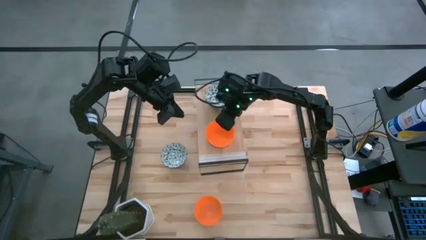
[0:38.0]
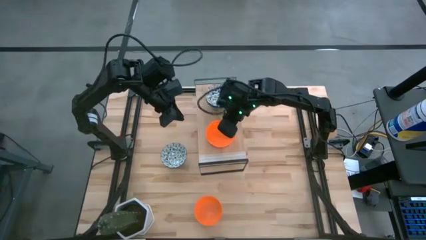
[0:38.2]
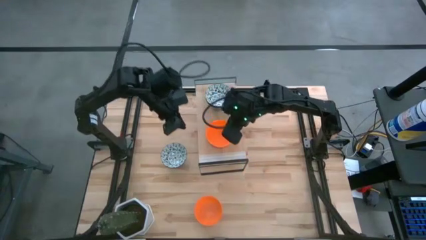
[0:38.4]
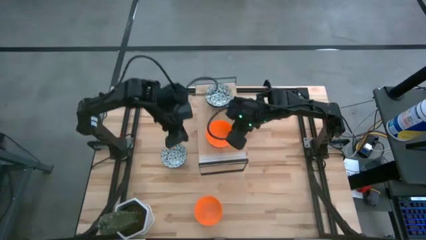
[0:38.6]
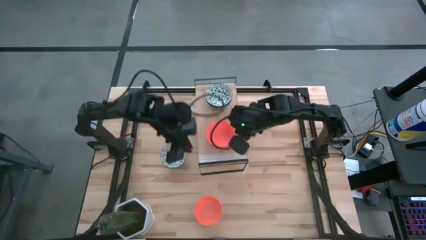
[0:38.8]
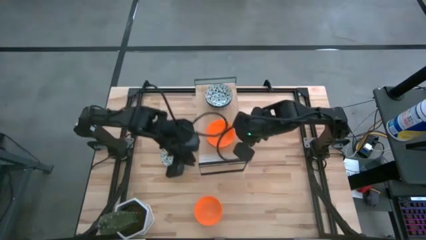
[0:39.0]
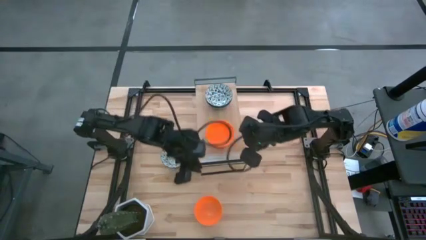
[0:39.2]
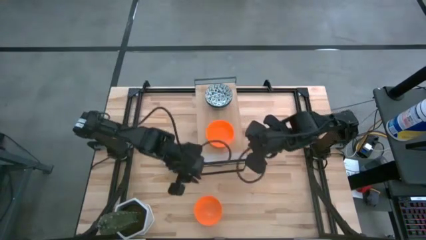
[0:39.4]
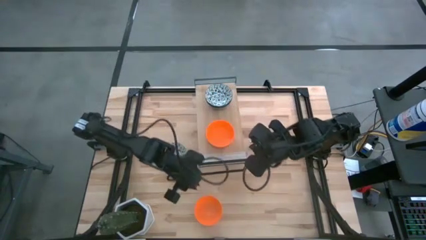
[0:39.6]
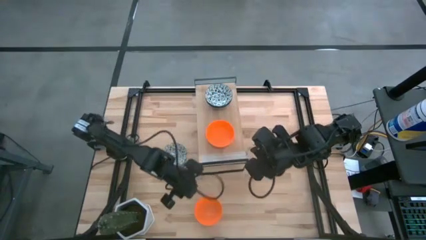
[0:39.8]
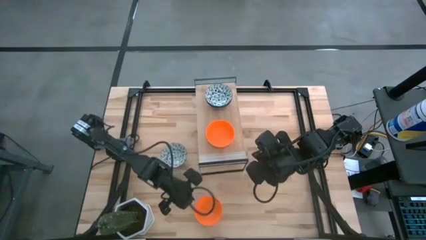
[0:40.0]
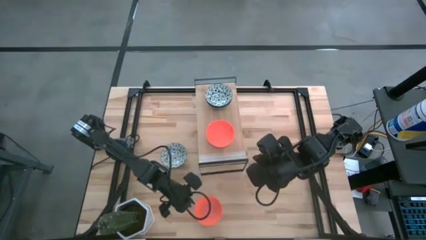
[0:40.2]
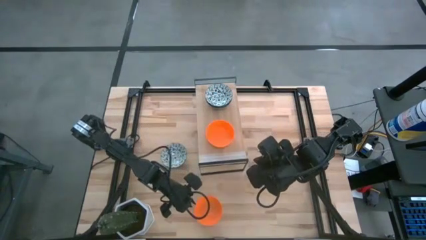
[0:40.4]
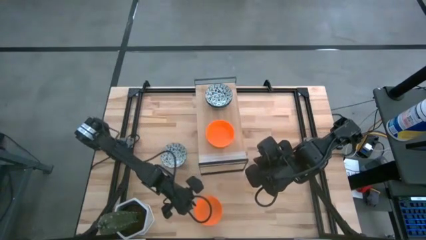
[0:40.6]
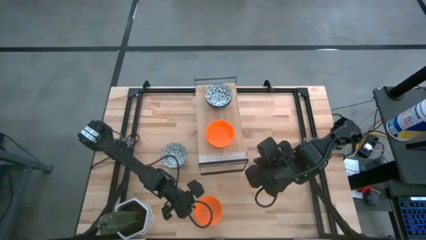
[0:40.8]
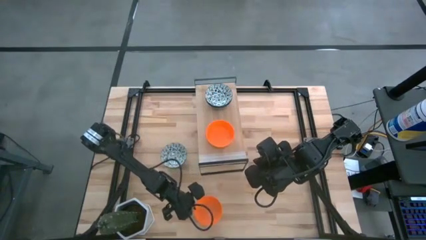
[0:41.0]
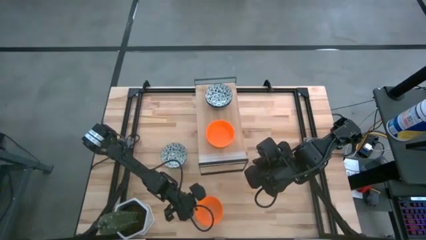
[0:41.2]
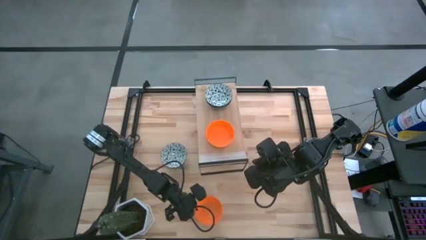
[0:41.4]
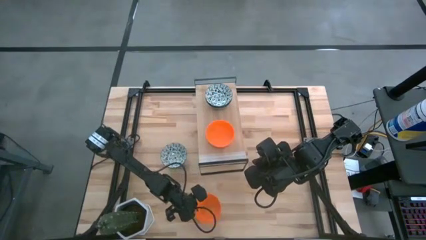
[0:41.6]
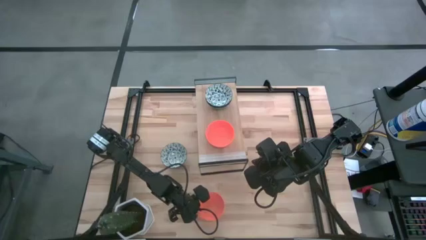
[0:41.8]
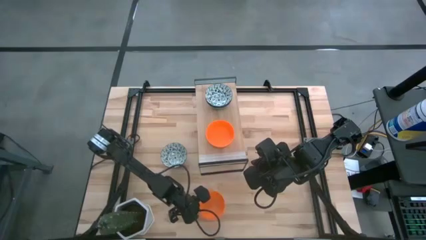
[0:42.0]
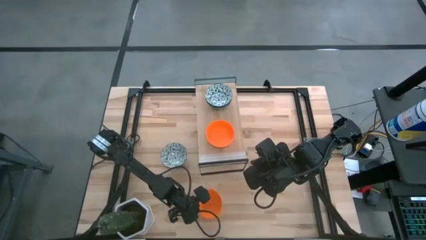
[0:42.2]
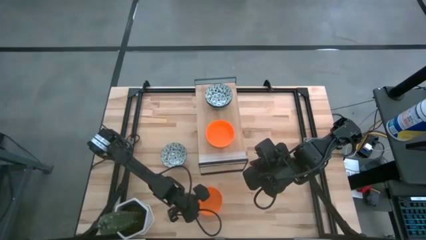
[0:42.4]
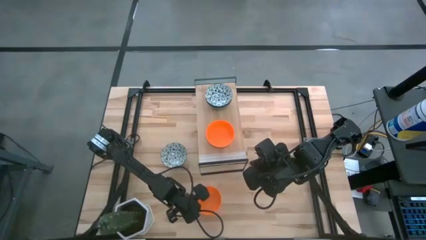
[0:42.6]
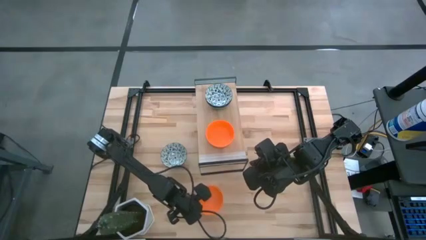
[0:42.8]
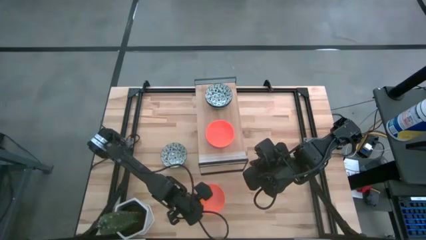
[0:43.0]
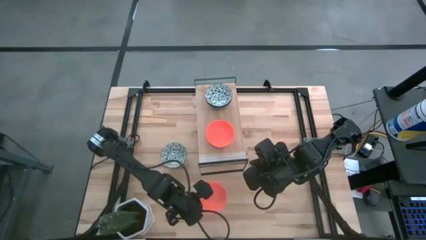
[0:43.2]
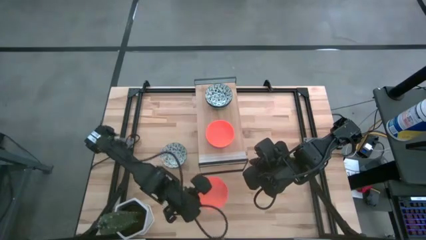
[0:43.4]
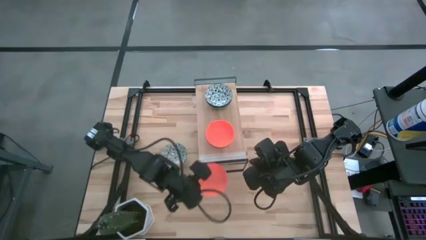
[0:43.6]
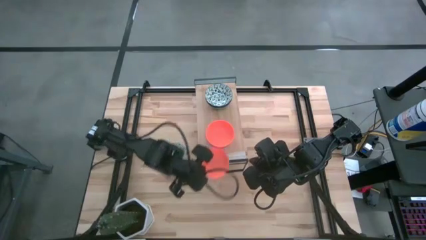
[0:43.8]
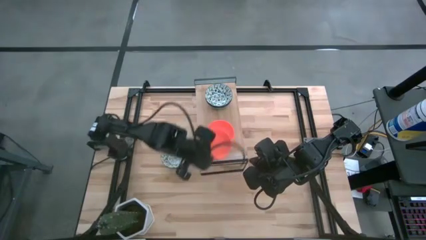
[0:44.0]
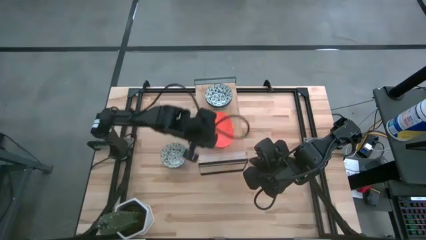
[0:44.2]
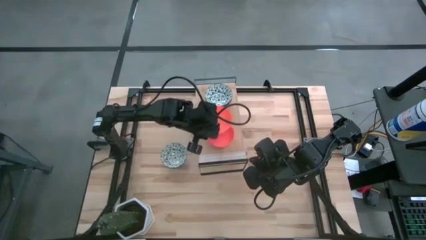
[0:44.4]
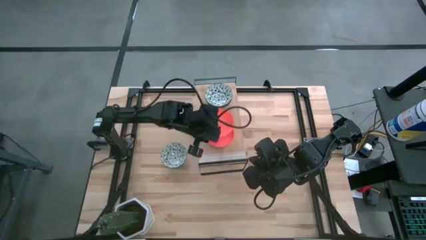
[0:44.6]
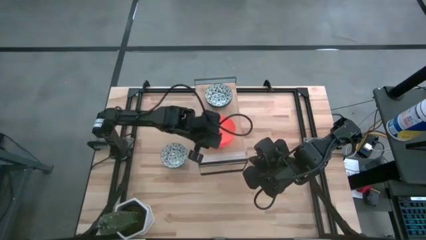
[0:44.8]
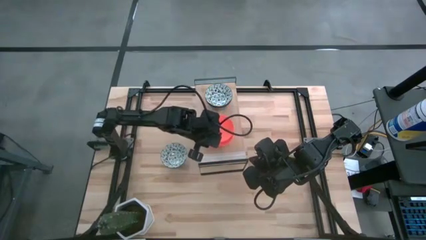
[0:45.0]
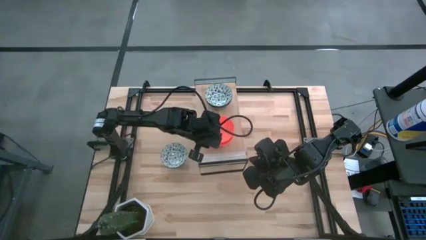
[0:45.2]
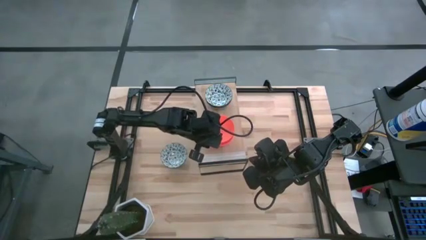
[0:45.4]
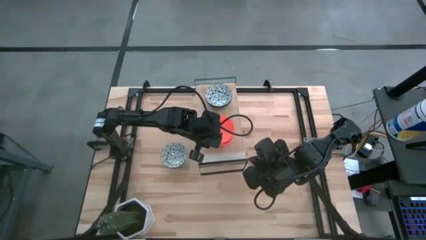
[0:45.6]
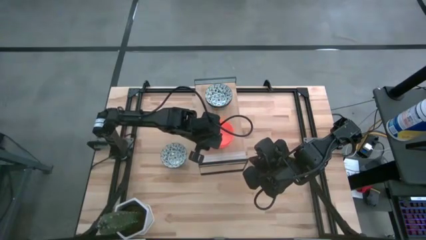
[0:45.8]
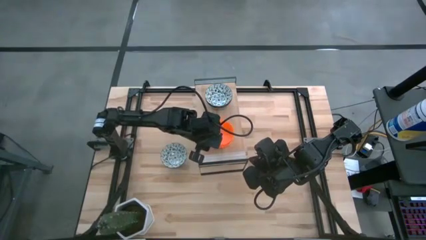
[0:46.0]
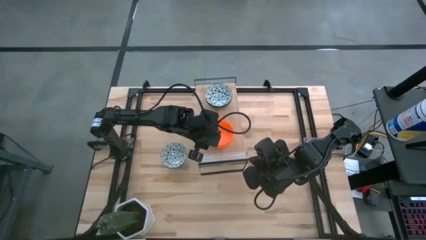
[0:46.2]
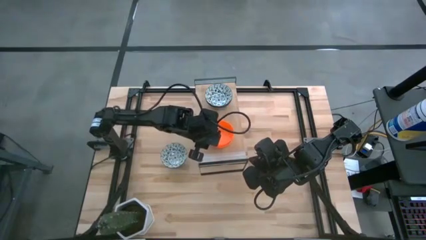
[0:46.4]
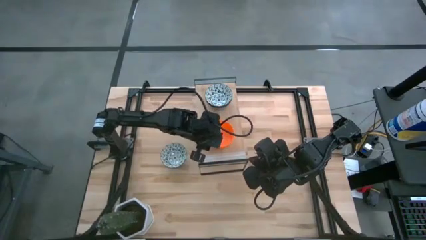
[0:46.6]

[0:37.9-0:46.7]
Task: Pick & Place Mini bowls
Stack the orange bowl on top of the orange bowl on the shelf

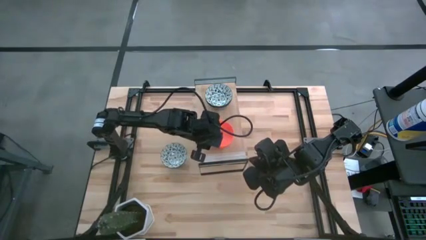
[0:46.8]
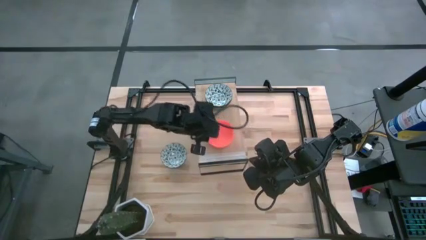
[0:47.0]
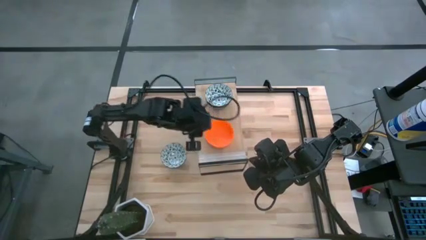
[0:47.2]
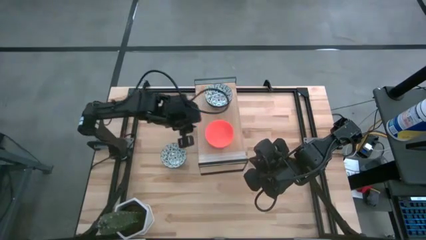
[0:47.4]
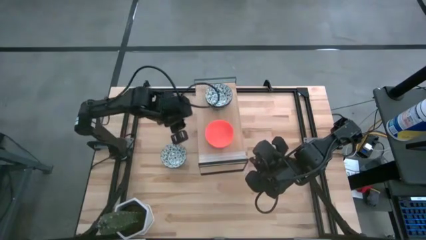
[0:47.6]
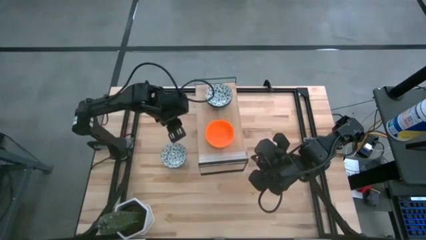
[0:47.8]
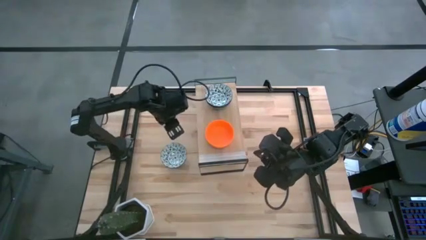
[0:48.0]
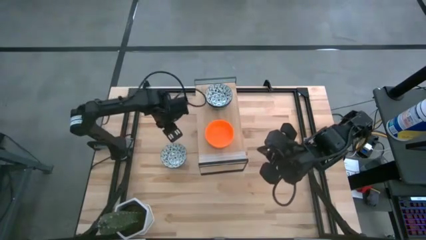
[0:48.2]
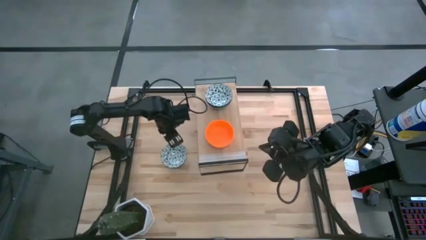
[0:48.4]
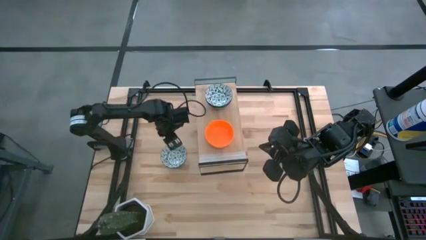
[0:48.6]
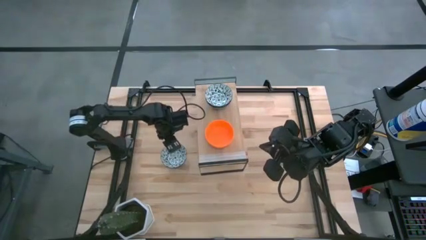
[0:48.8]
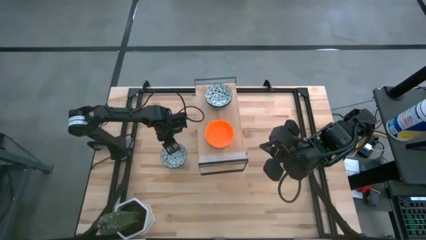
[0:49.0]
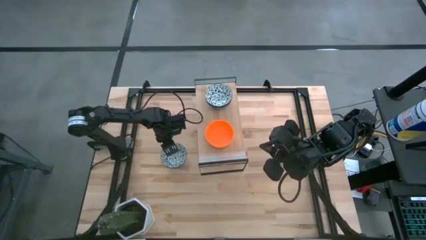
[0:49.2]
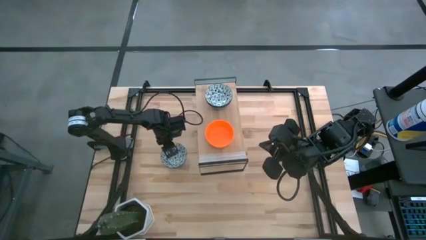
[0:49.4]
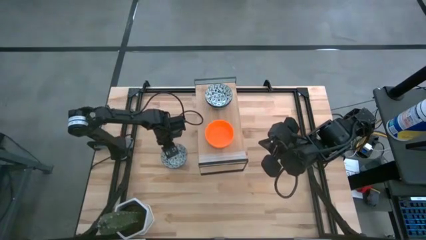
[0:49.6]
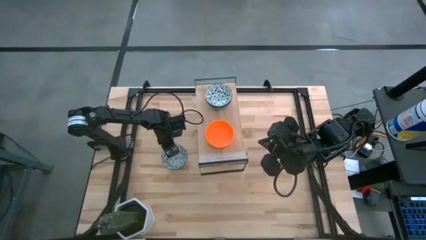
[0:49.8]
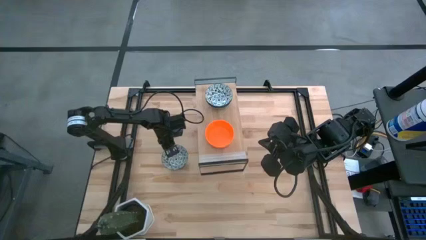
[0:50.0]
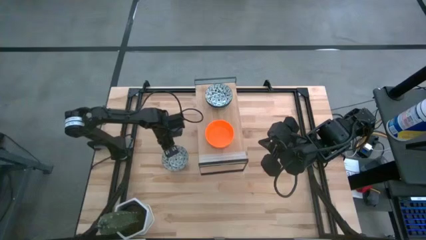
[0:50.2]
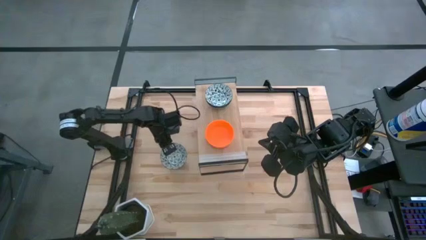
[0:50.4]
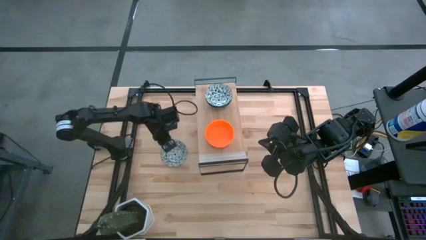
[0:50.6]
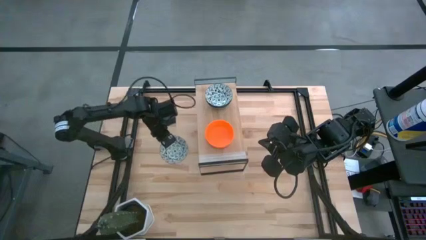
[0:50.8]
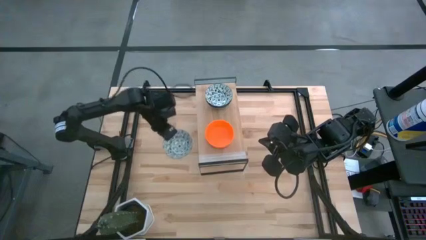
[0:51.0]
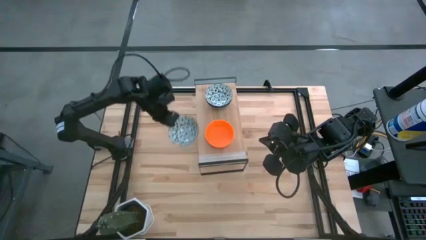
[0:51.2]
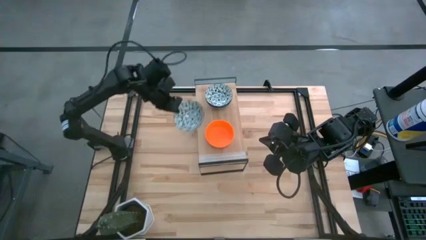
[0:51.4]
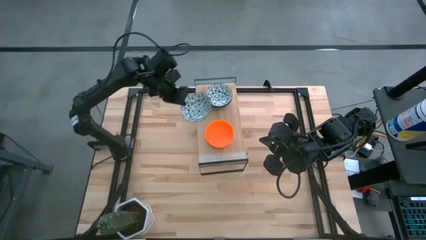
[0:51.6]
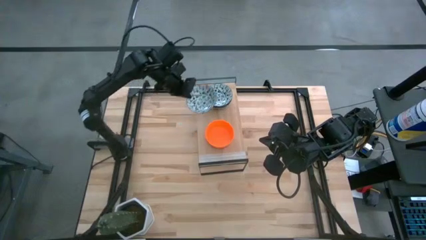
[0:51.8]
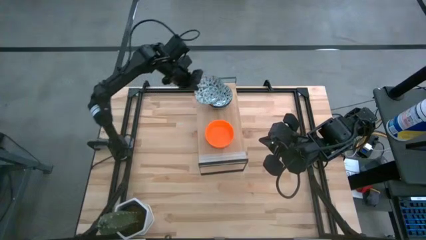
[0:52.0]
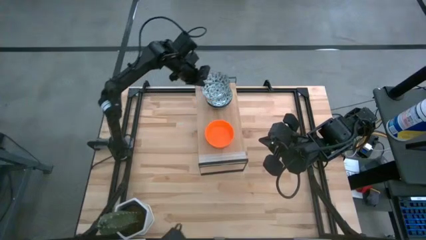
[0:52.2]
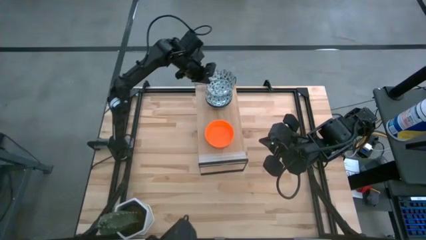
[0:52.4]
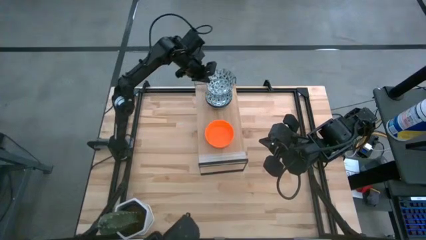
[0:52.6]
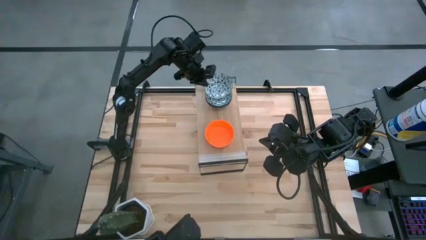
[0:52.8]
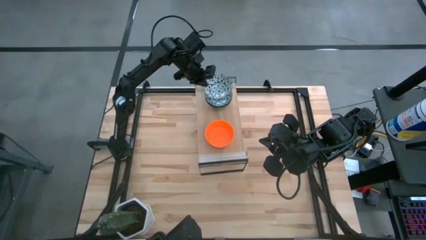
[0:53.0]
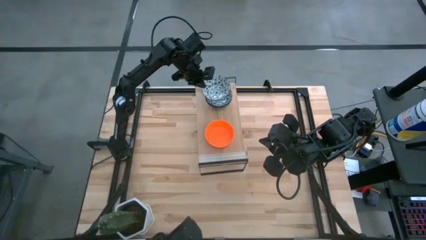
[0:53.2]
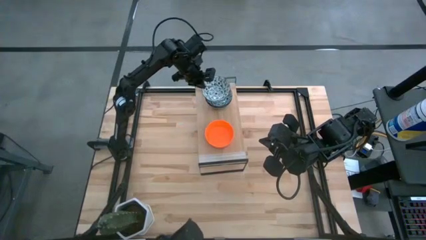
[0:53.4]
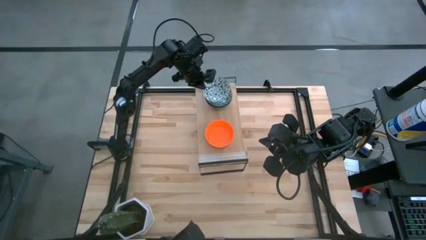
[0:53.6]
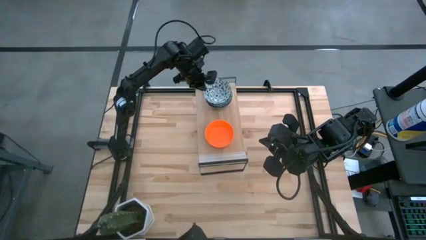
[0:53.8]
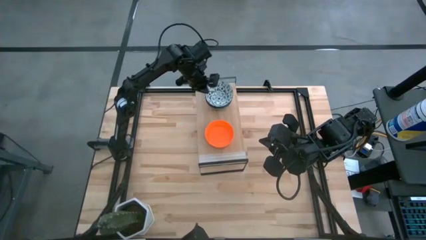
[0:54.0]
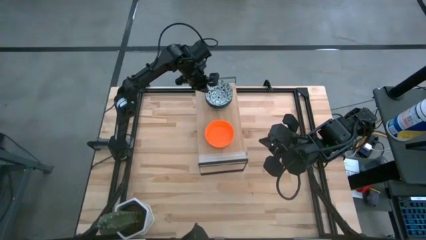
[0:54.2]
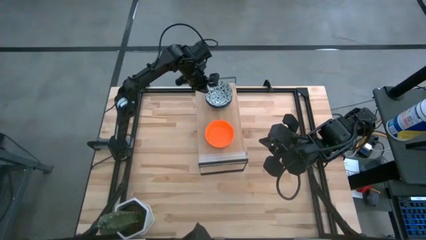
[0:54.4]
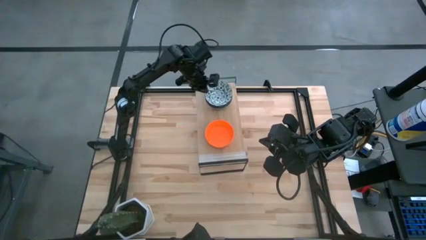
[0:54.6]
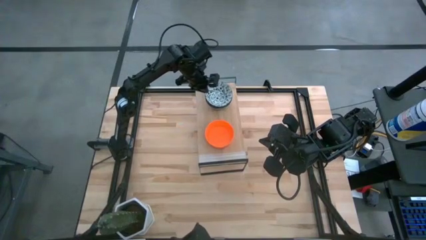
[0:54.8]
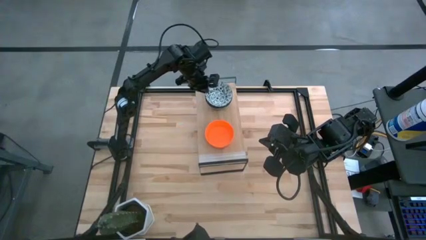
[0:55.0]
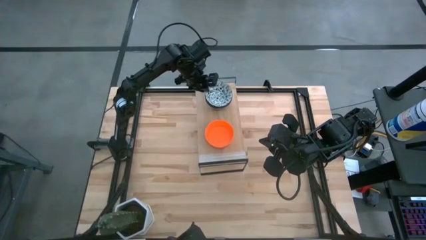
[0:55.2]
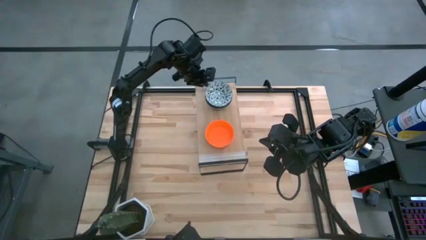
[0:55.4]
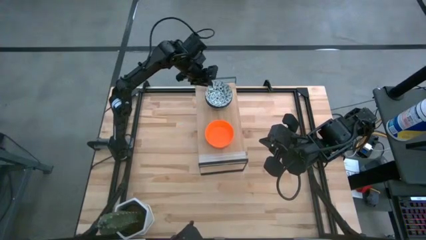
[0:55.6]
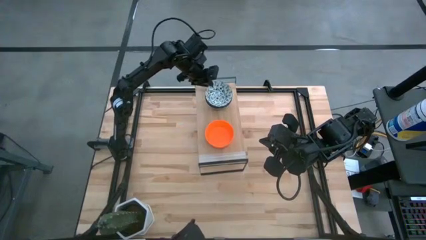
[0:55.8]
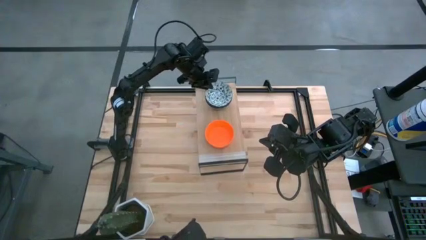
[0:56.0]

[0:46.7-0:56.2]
Stack the blue bowl on top of the blue bowl on the shelf
